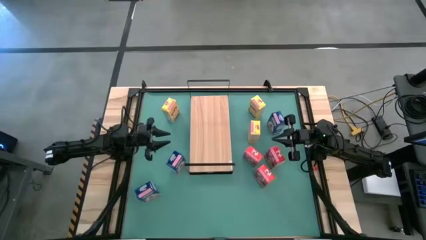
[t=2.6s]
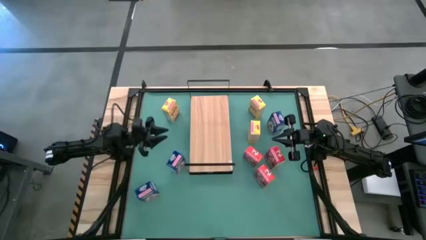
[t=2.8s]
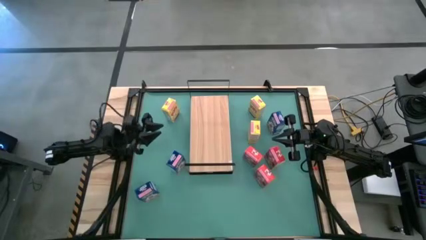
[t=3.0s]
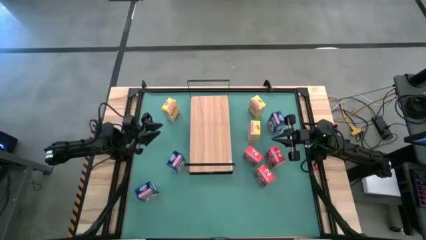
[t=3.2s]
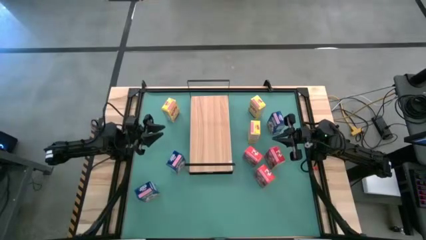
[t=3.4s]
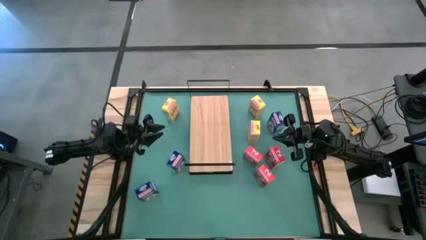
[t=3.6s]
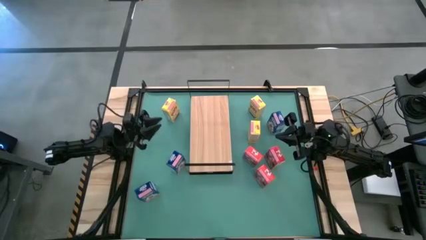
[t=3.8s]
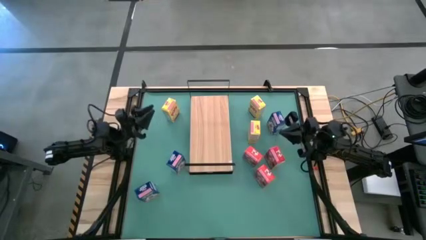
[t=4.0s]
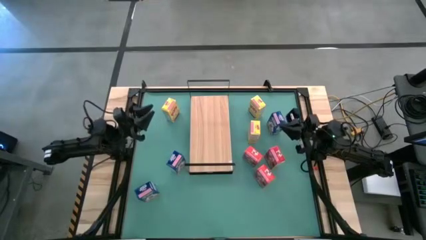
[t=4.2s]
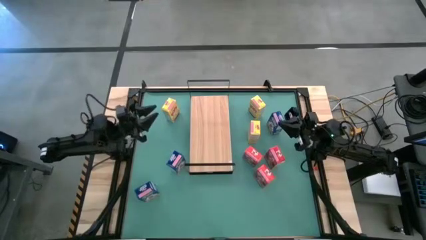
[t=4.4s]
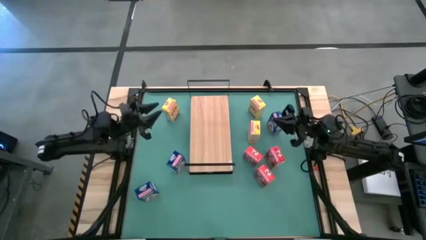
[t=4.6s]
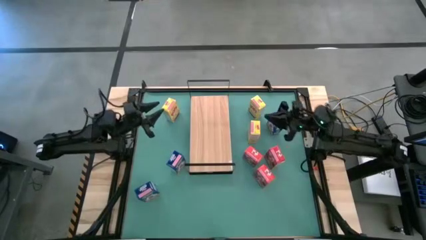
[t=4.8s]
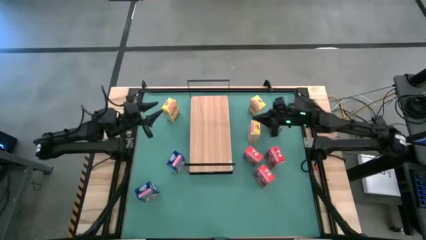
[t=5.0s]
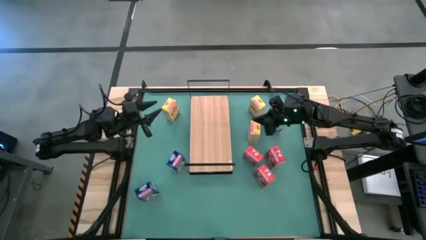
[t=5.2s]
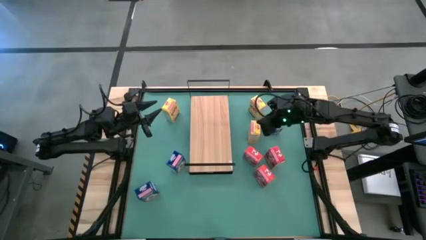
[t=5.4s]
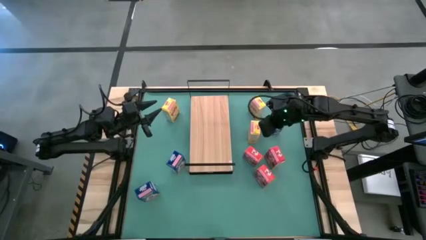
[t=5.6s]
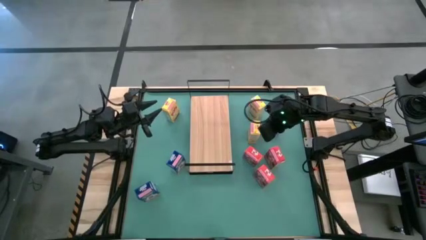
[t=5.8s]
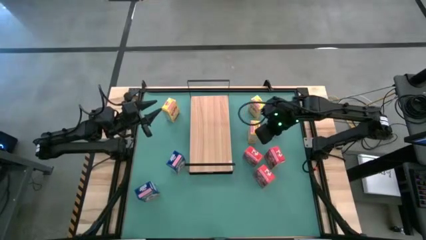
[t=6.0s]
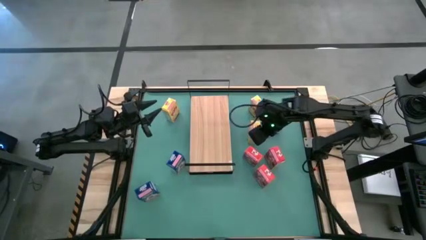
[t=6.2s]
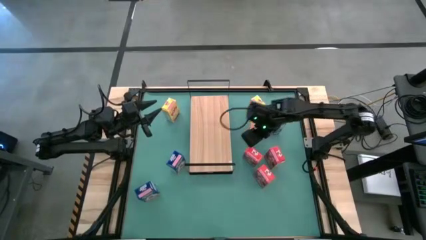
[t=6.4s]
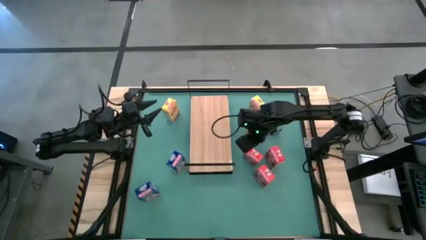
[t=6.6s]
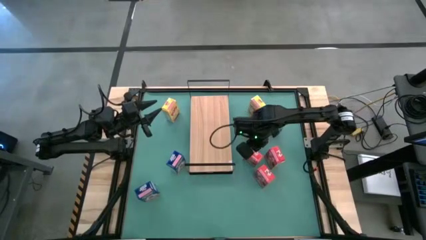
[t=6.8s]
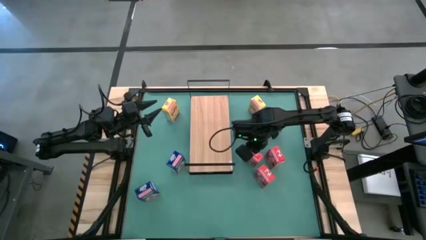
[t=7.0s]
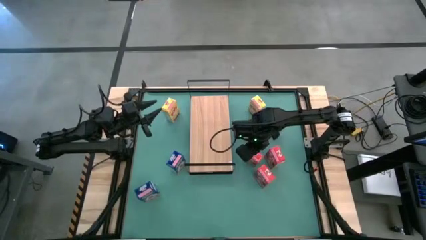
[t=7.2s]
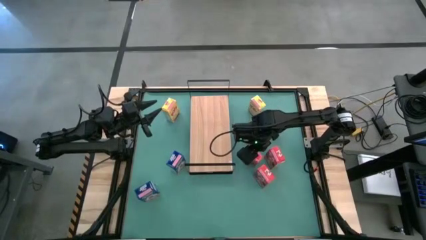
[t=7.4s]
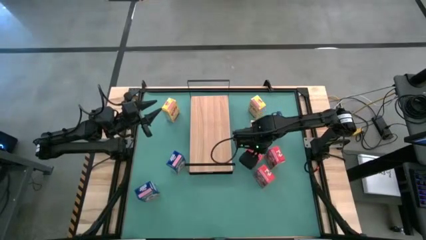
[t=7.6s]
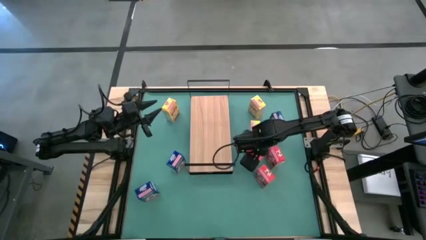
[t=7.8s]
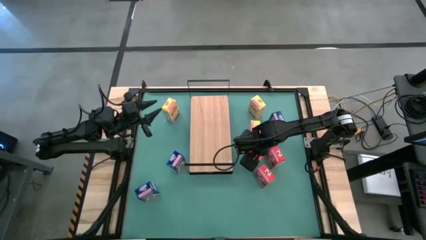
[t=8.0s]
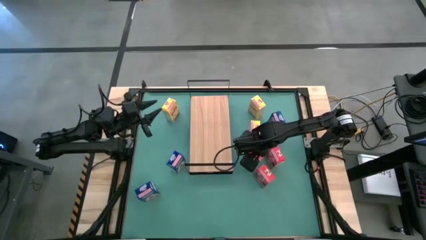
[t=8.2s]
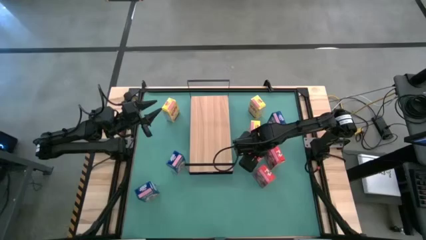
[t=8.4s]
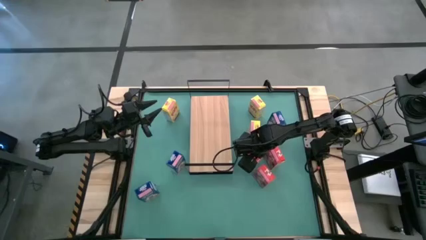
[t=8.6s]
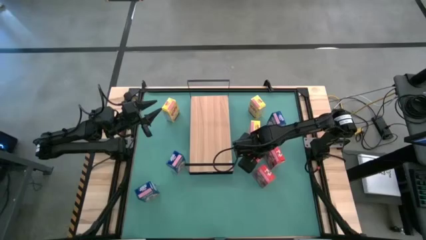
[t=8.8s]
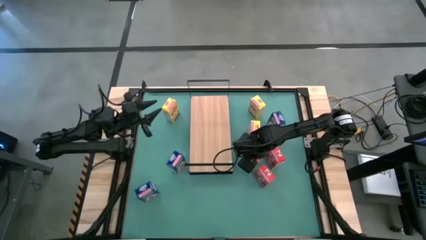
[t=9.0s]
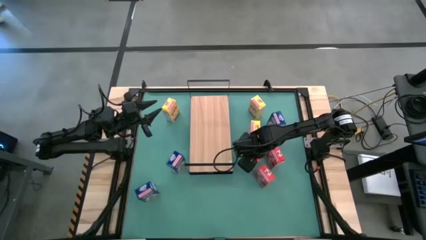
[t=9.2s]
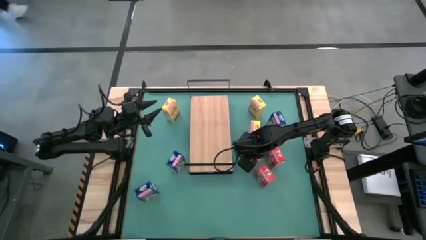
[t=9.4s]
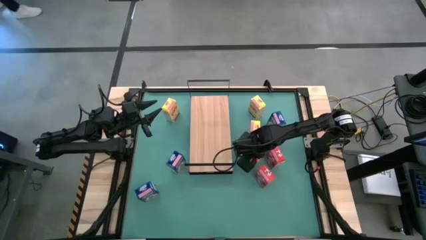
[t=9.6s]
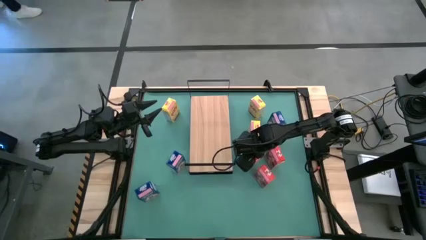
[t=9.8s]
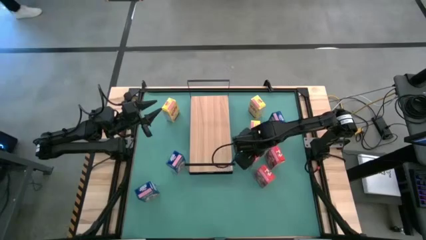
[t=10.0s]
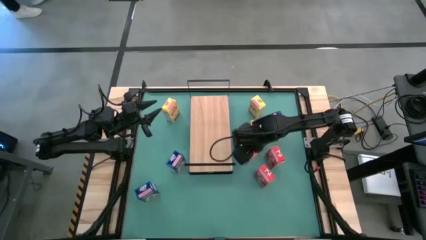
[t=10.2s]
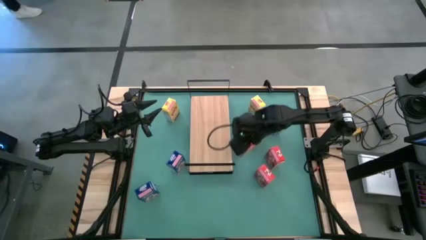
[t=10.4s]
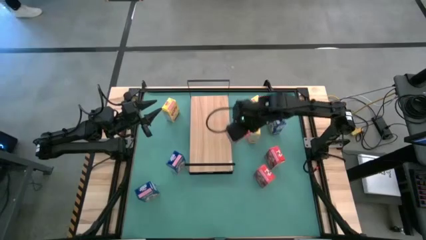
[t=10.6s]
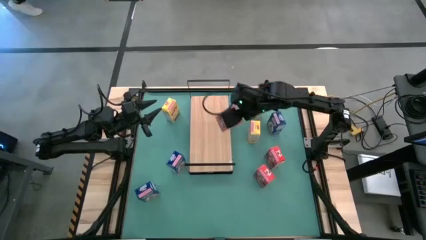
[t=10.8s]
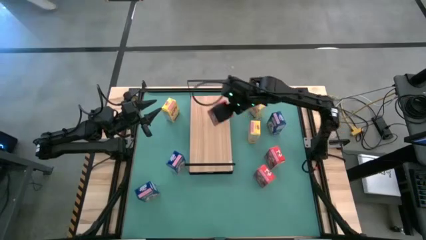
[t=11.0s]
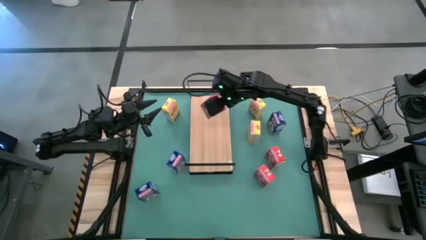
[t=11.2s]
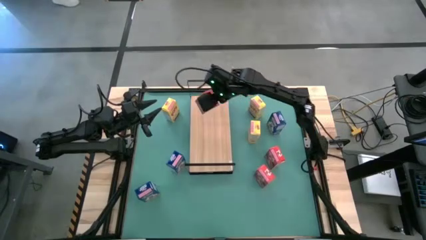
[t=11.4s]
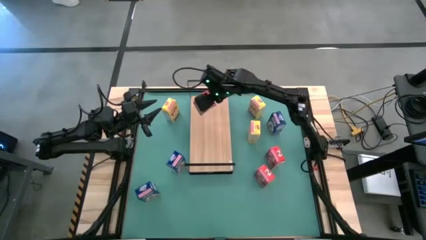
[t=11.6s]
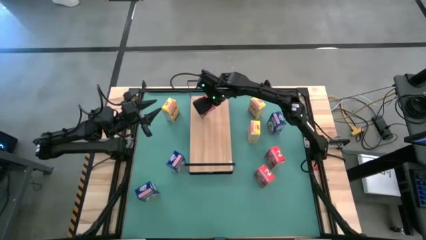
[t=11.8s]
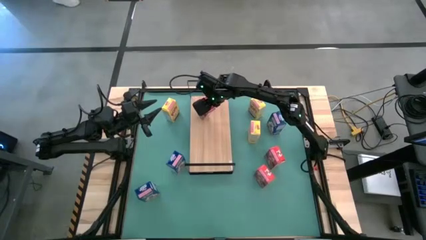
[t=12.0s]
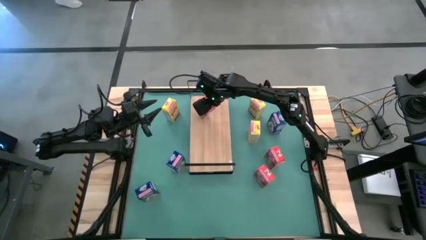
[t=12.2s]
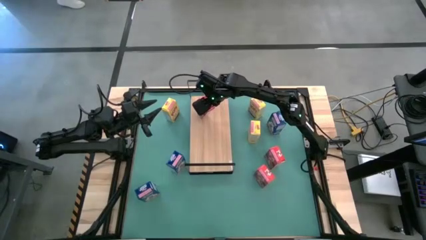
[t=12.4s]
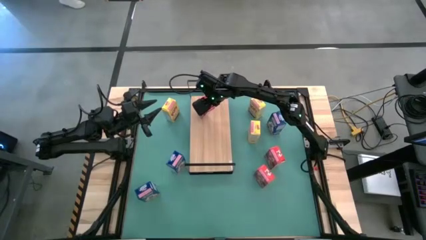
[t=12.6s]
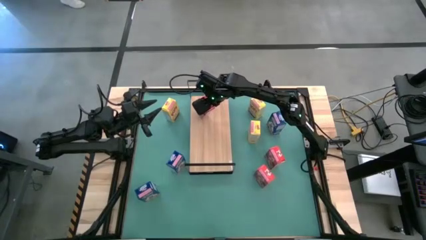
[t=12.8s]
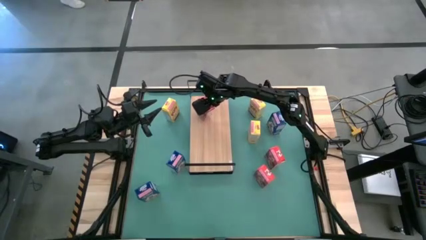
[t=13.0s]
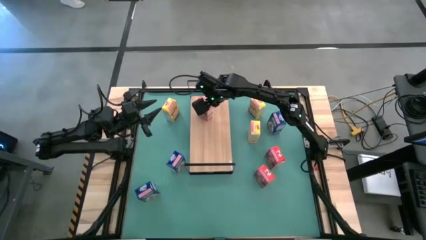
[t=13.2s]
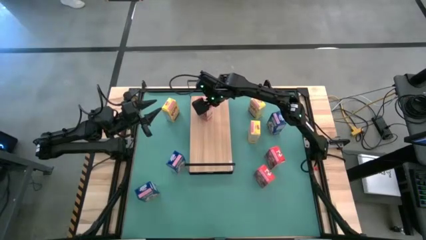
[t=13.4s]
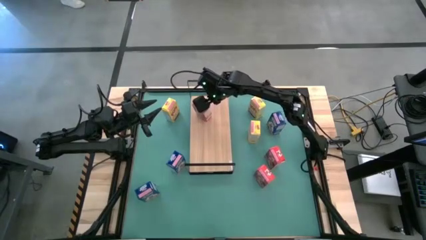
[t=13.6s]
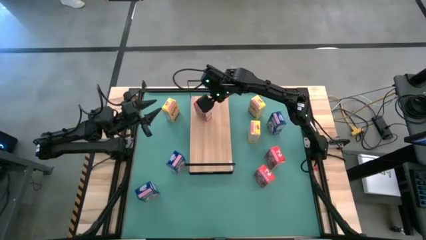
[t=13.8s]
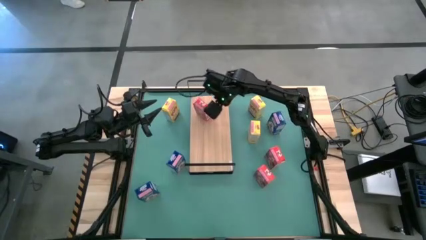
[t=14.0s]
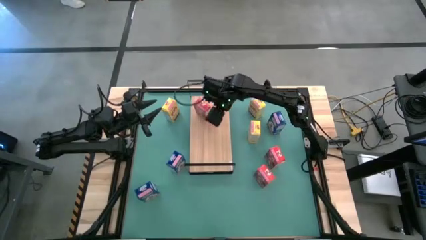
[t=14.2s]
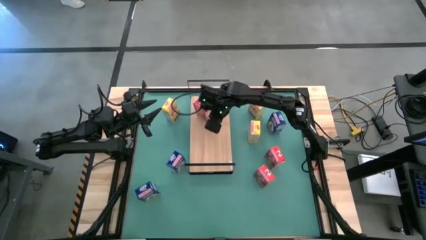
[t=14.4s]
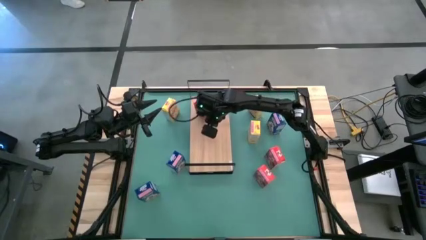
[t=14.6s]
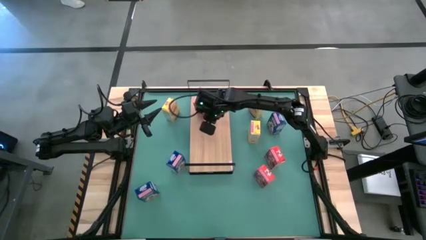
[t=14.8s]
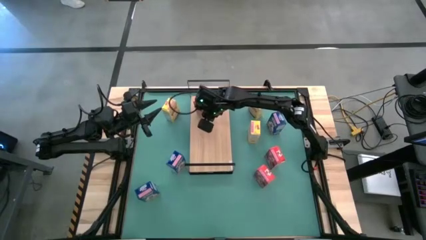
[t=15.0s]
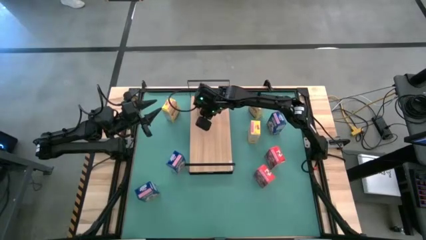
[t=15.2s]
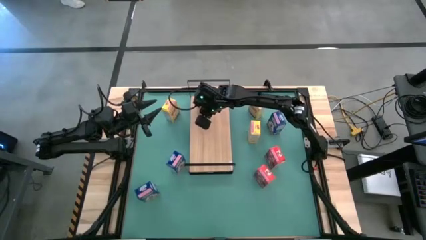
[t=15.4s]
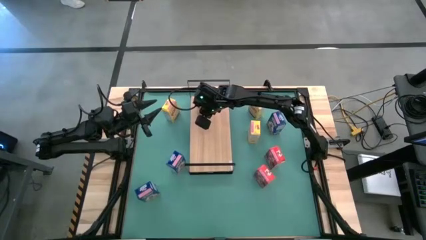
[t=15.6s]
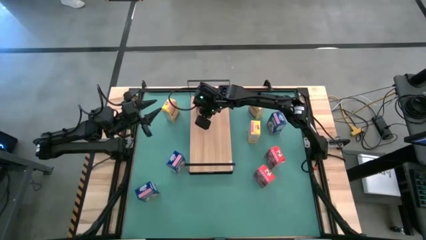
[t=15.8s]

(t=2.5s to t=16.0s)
Task: Stack cereal on shelf
Put the top left red cereal box on the shelf

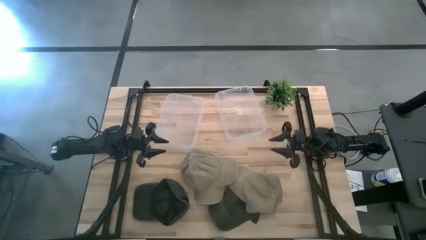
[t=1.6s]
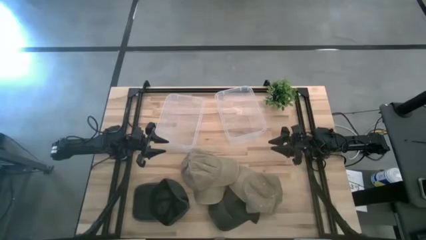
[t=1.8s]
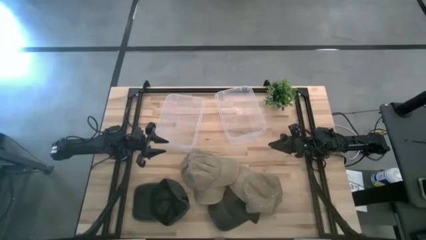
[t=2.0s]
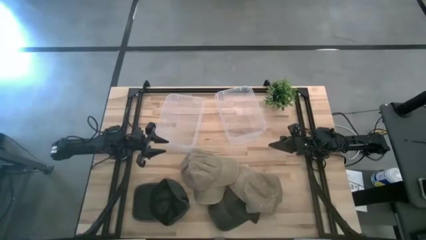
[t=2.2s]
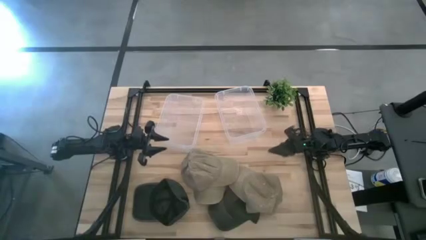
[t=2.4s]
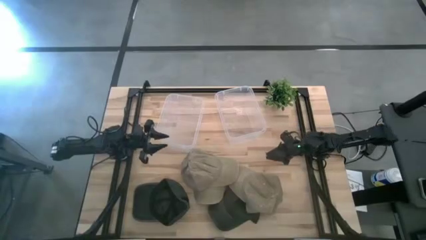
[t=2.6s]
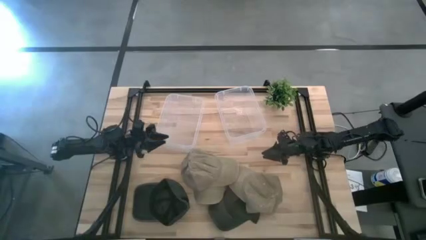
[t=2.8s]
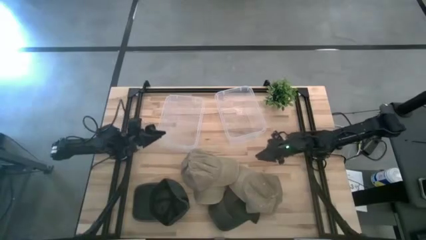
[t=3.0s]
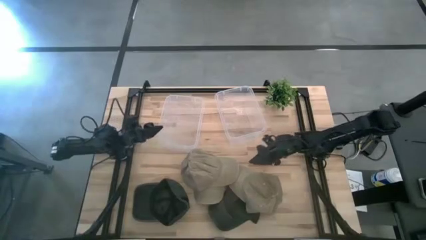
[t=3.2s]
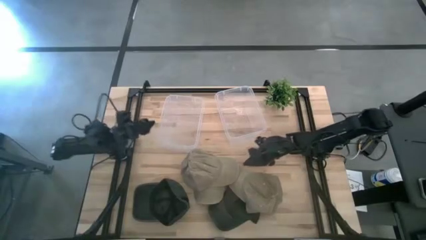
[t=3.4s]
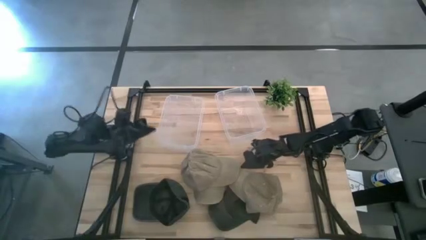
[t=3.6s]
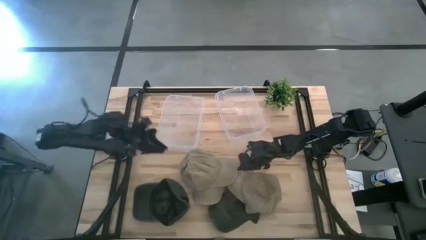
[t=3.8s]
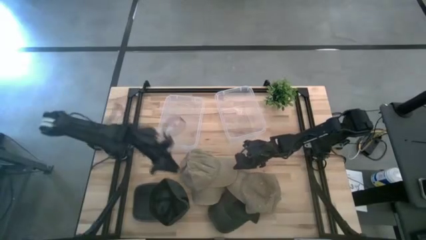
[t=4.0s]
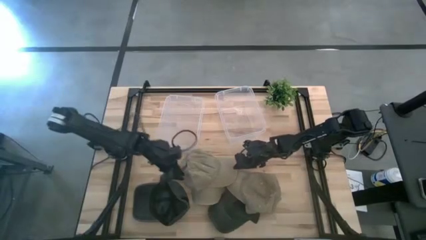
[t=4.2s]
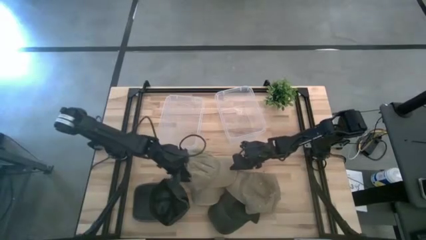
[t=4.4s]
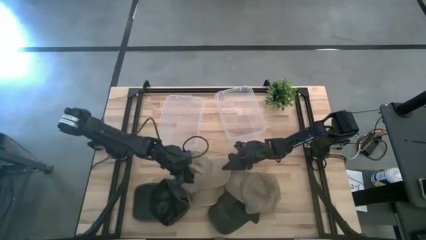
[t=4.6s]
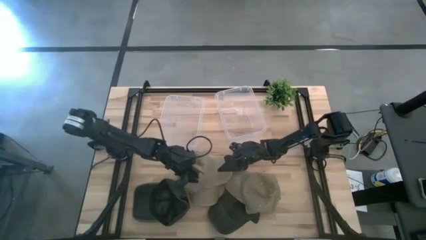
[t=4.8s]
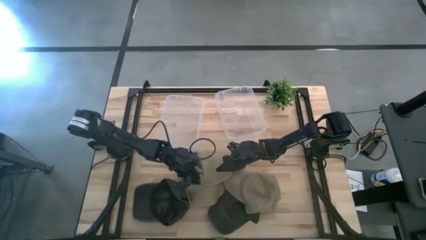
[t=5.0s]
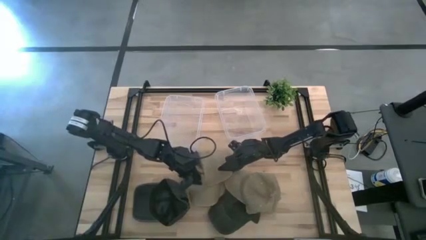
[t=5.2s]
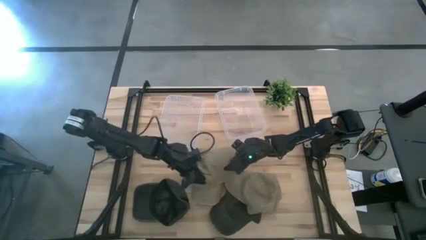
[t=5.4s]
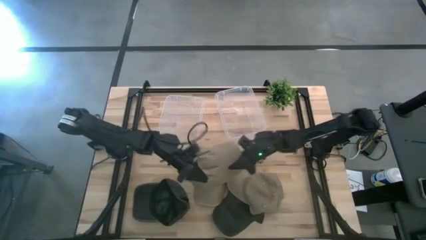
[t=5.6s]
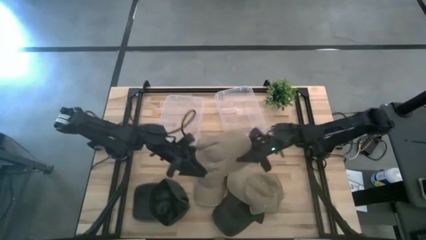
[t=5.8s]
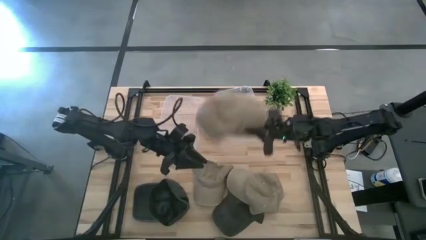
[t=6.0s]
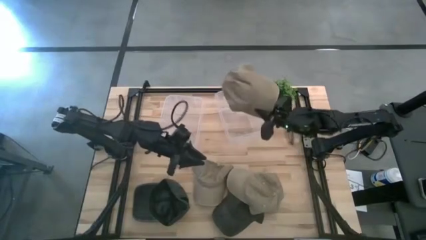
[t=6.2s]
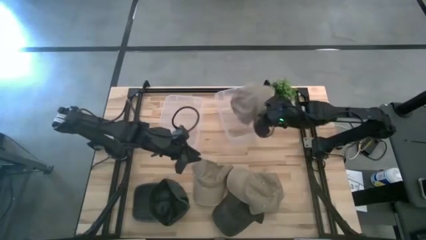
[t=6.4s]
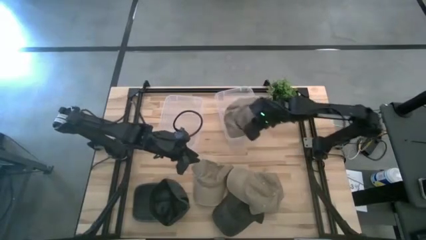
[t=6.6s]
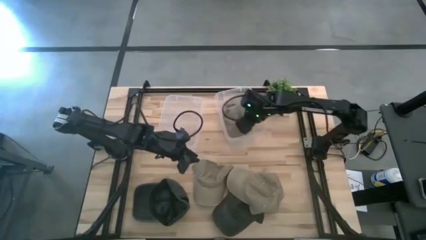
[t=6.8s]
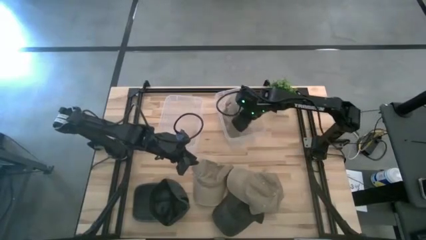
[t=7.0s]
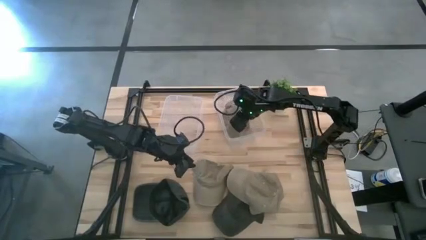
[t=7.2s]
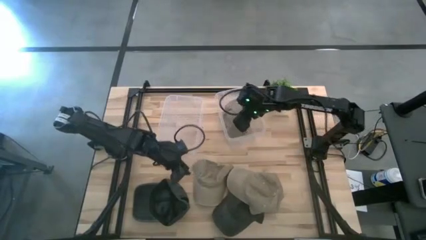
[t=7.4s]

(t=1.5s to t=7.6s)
Task: Pick & Place hat
Put the top left brown cap into the right transparent bin
